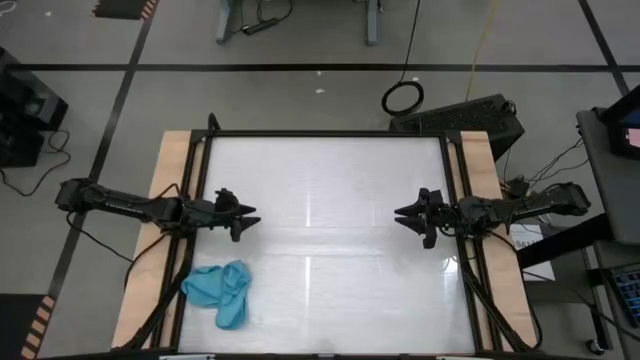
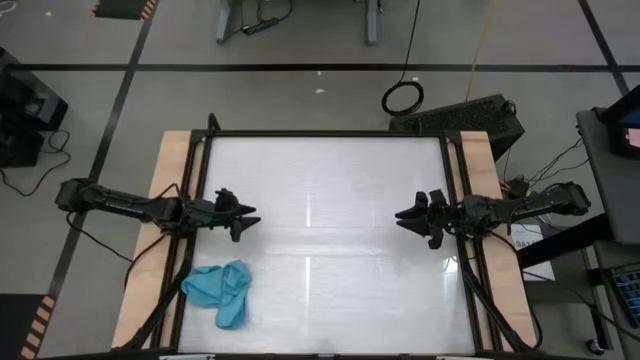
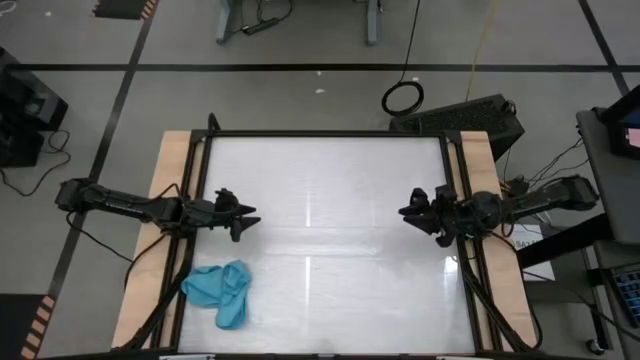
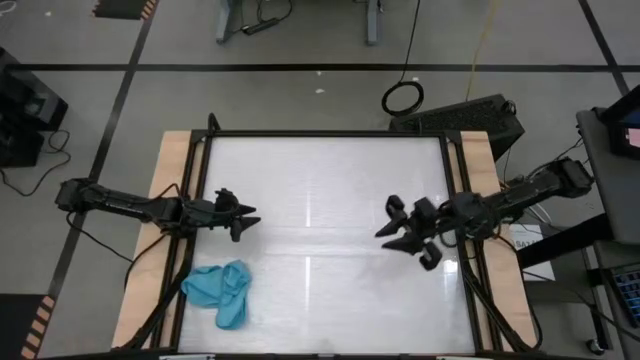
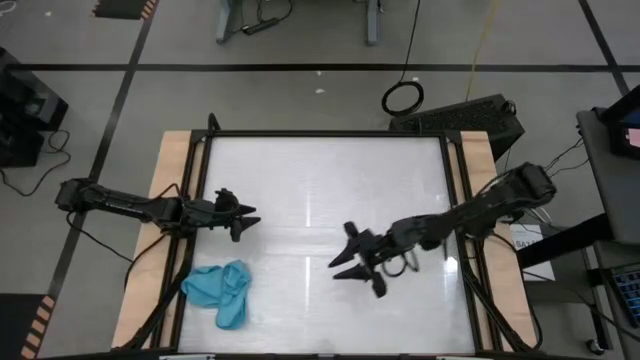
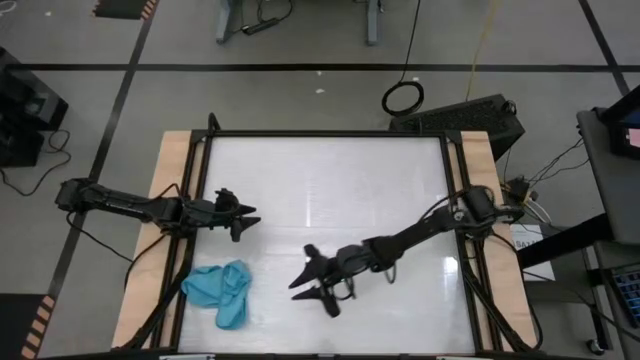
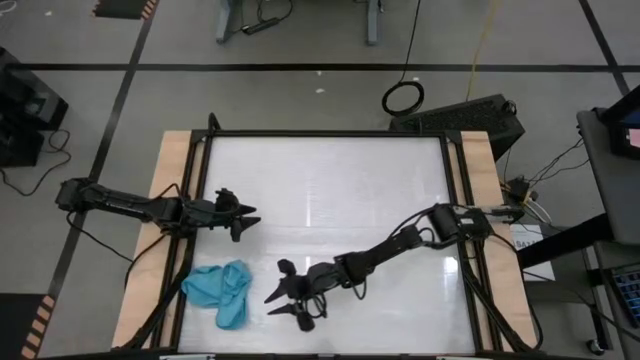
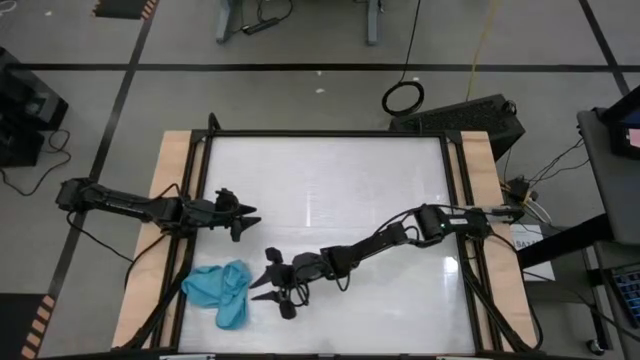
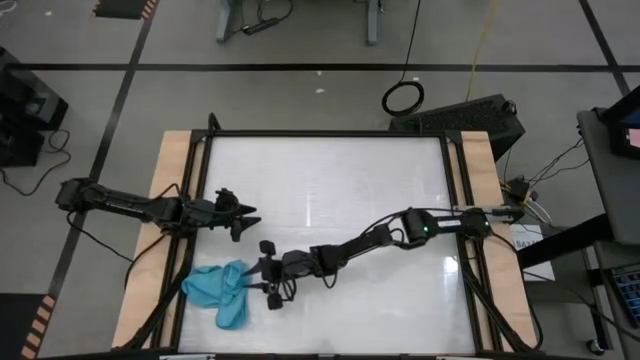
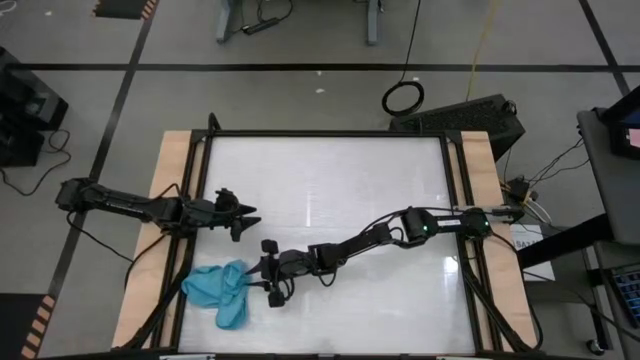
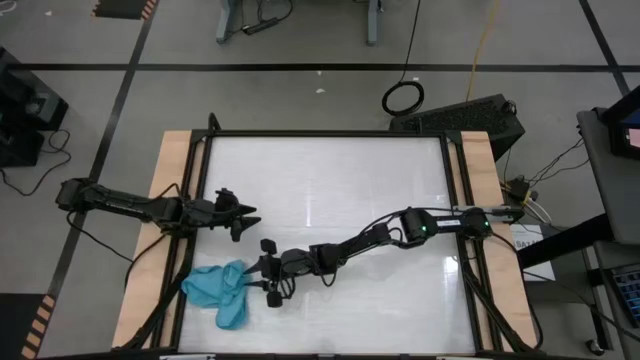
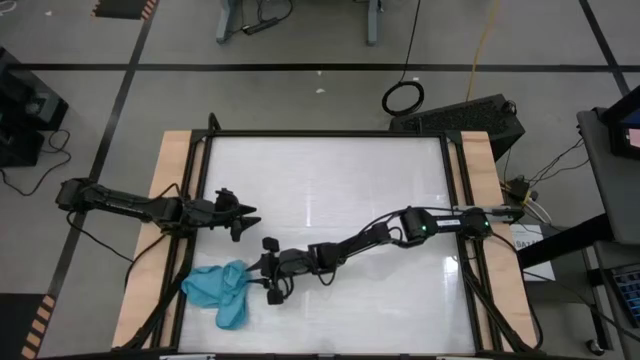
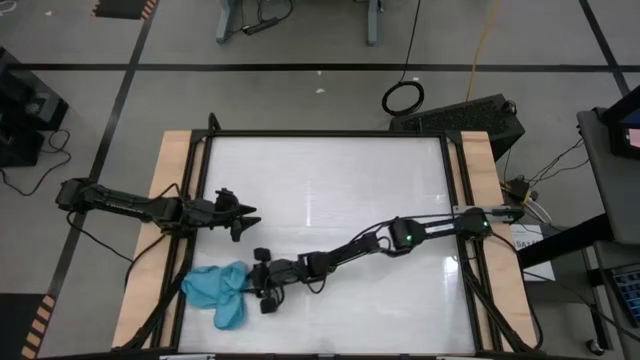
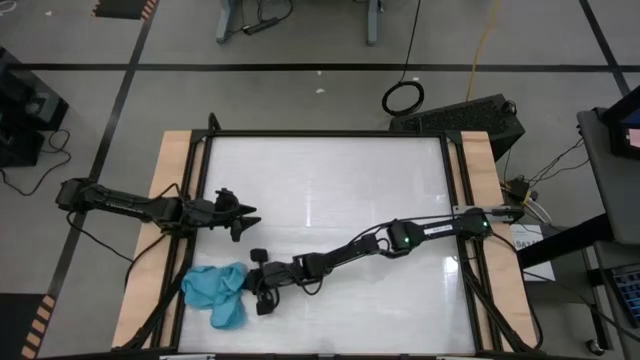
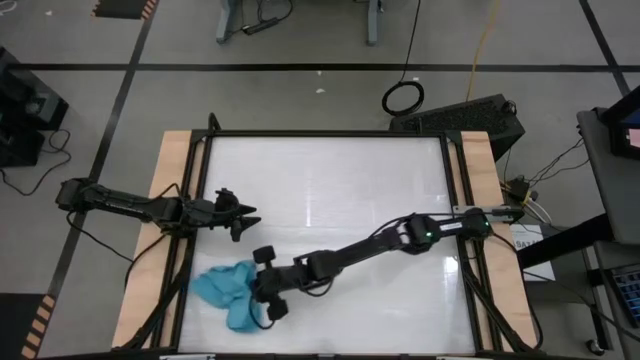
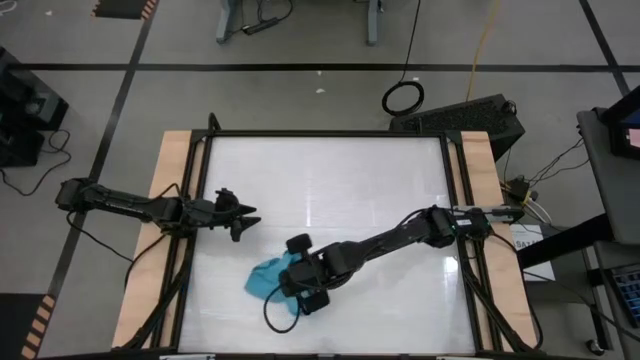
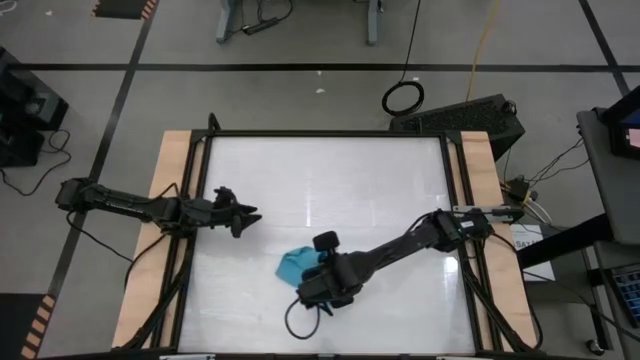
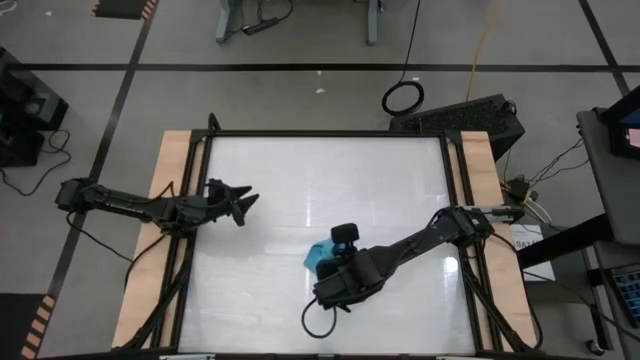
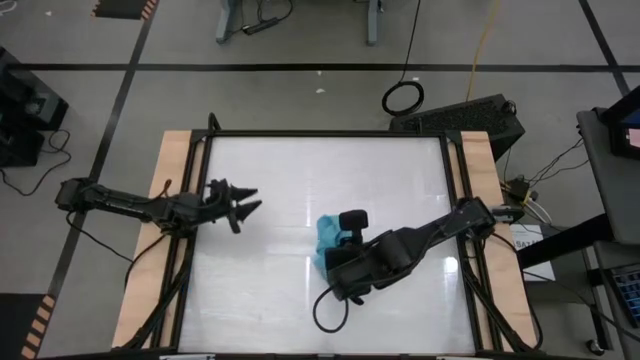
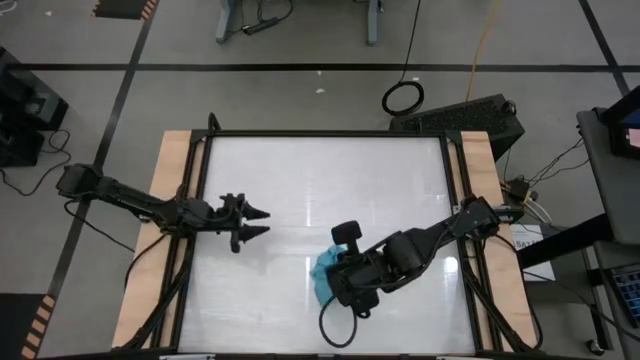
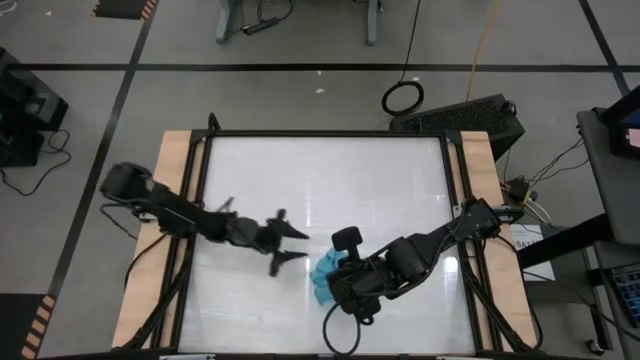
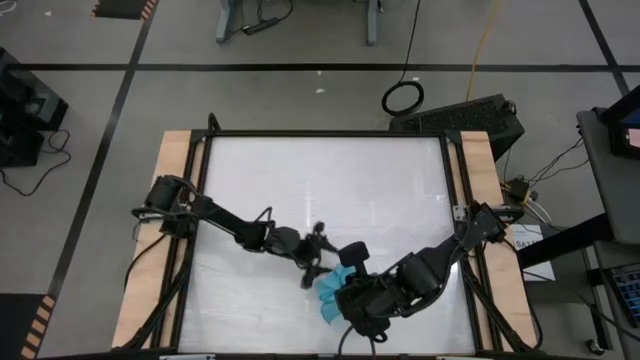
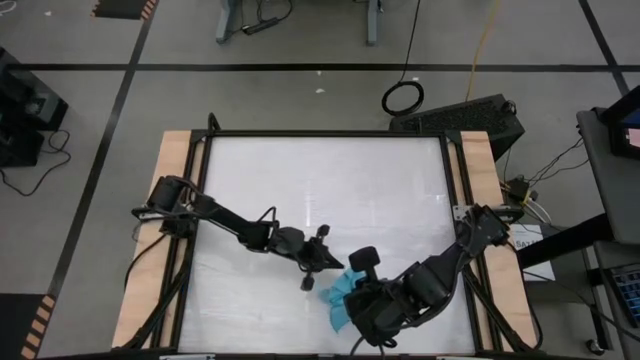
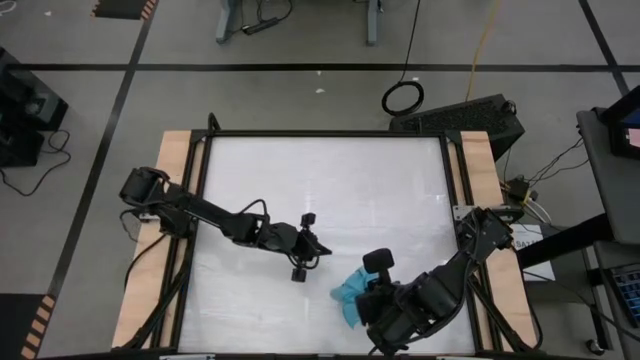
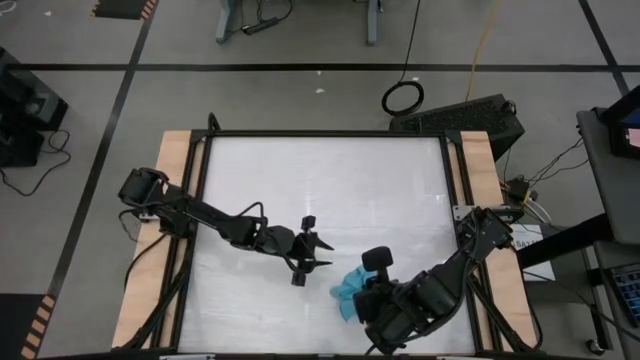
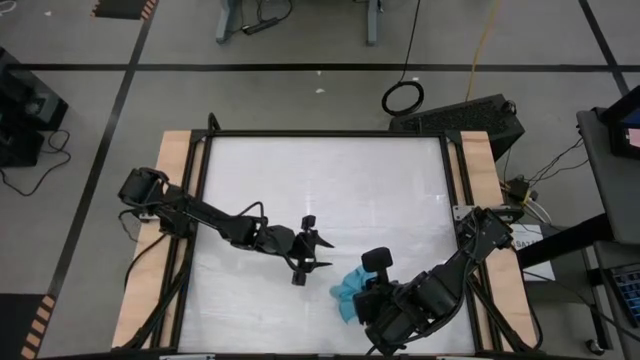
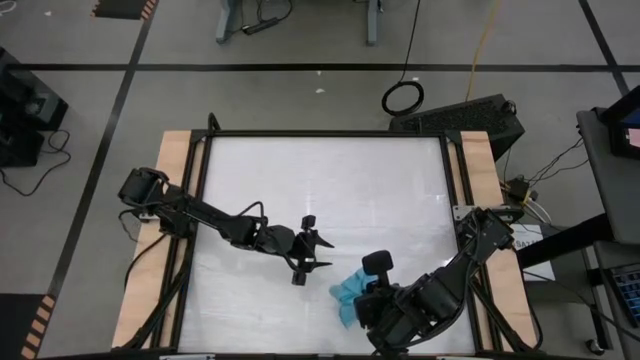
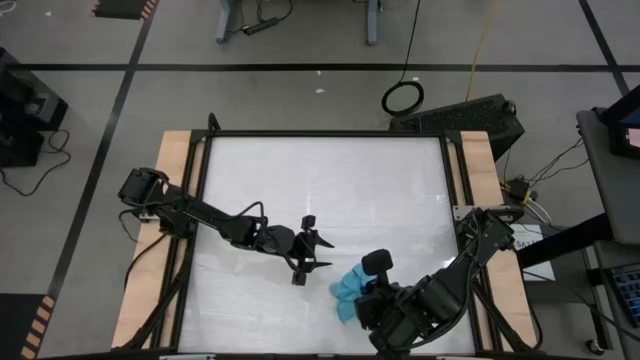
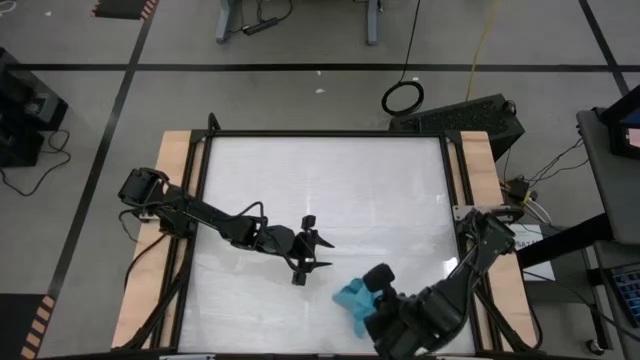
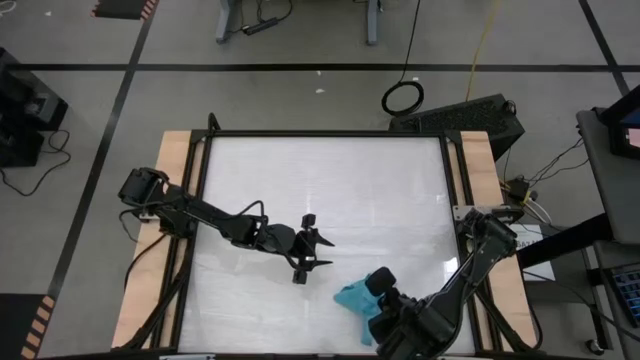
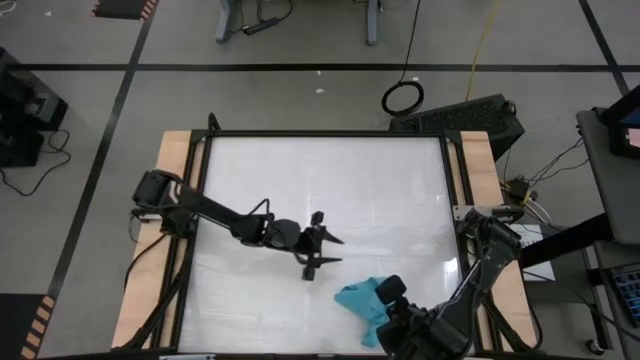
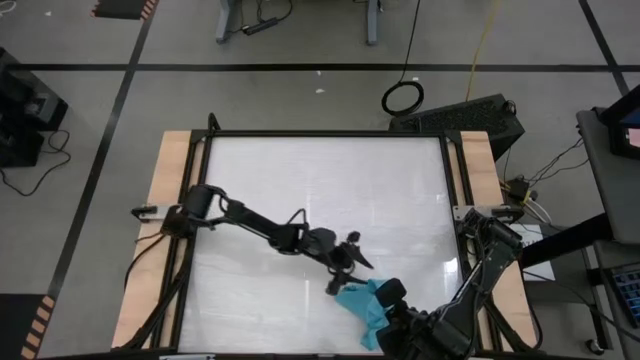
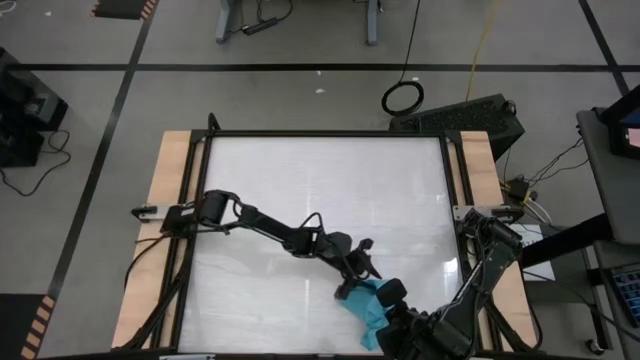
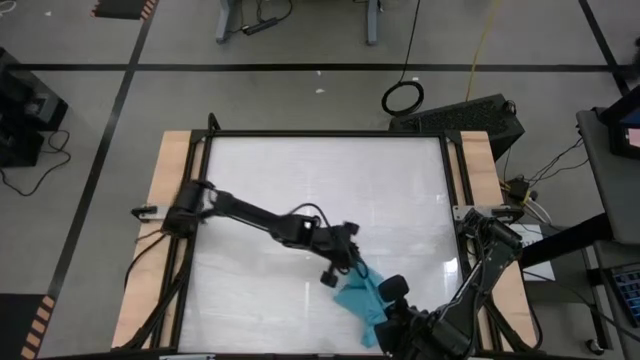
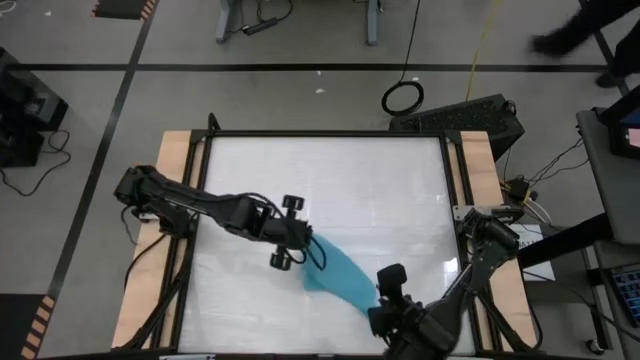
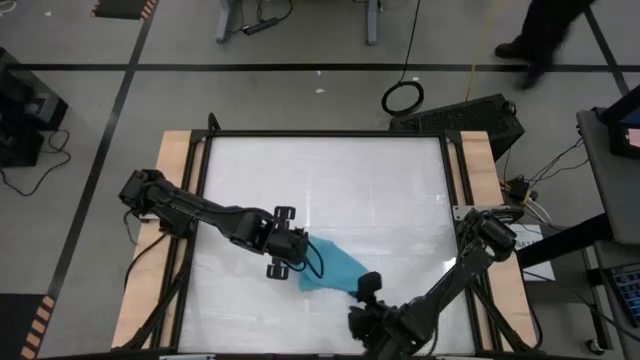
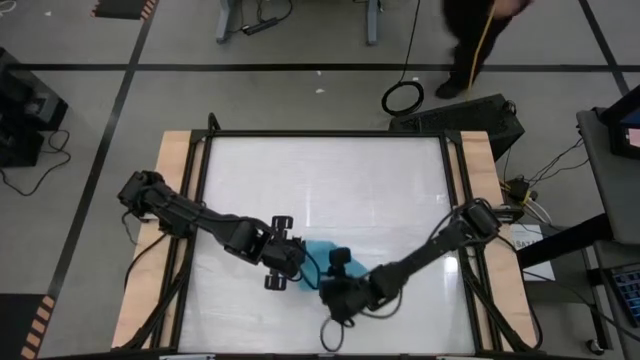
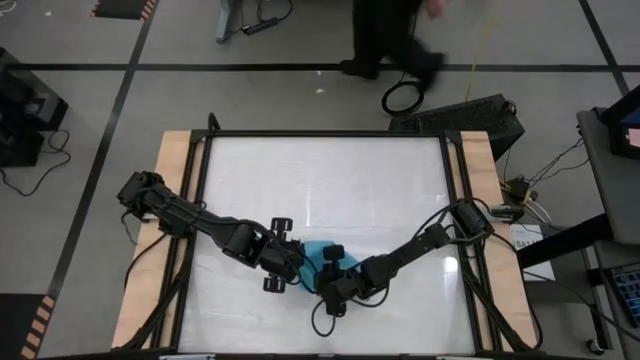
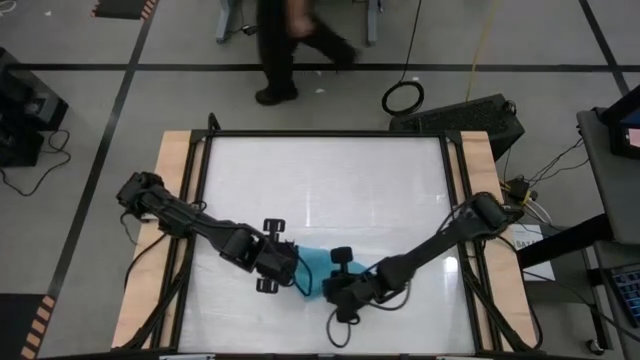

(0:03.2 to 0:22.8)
Task: Roll towel
Roll the blue microfiber towel
